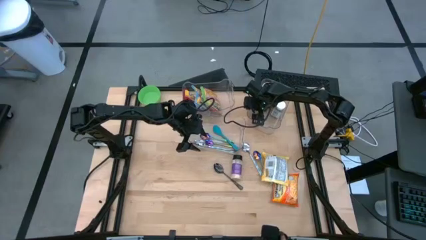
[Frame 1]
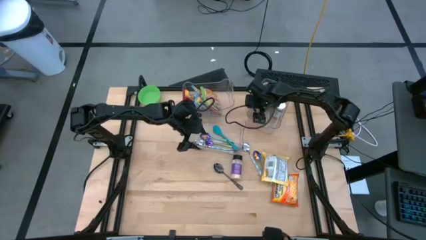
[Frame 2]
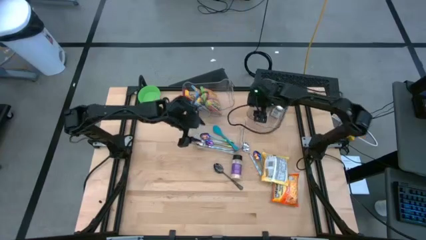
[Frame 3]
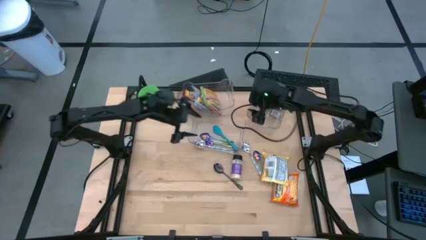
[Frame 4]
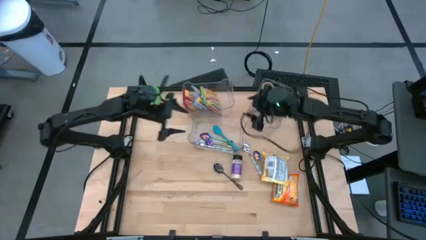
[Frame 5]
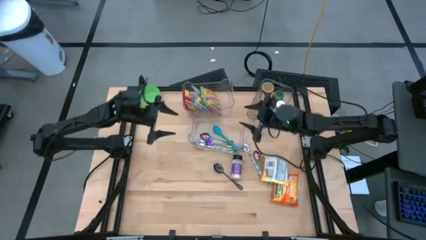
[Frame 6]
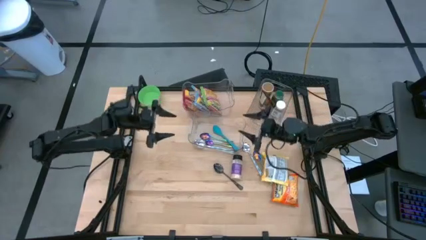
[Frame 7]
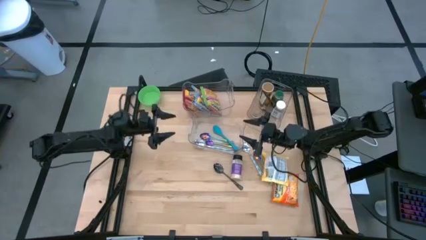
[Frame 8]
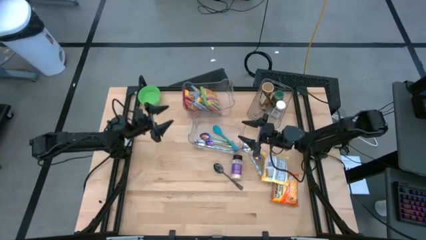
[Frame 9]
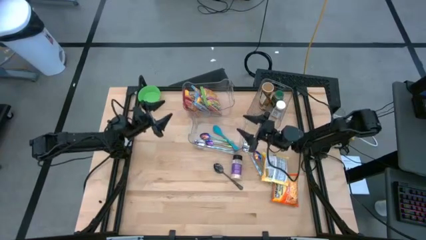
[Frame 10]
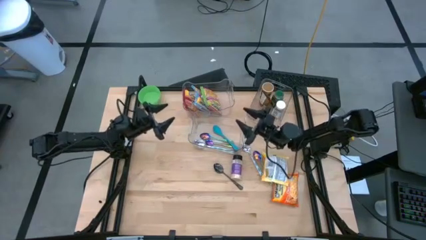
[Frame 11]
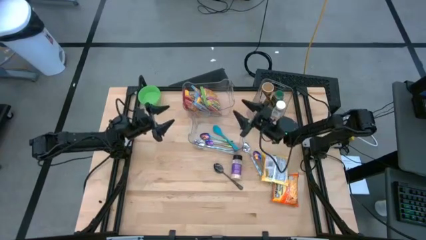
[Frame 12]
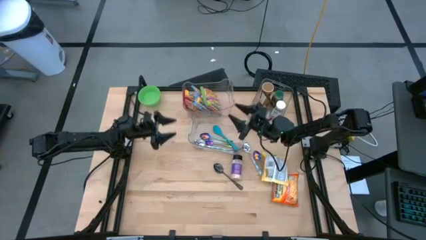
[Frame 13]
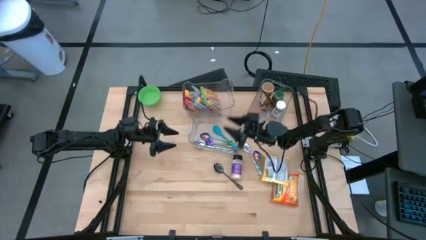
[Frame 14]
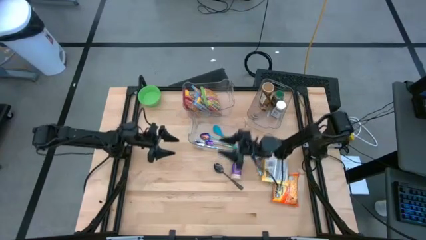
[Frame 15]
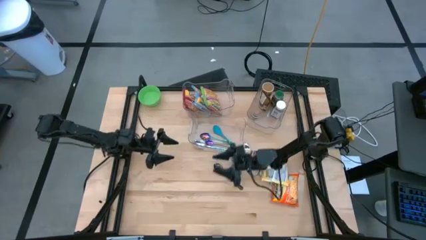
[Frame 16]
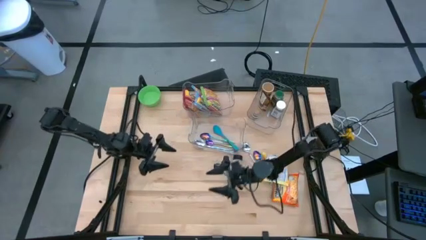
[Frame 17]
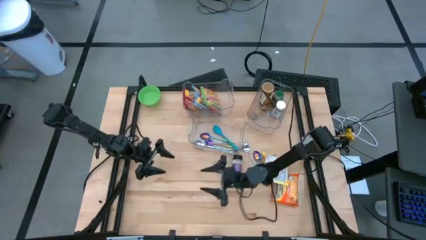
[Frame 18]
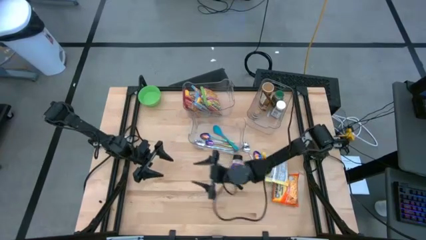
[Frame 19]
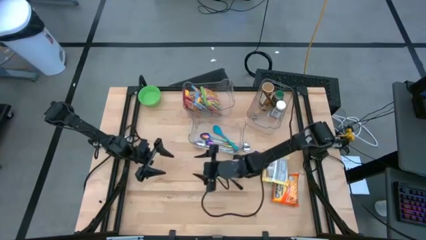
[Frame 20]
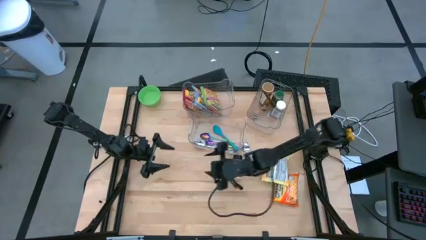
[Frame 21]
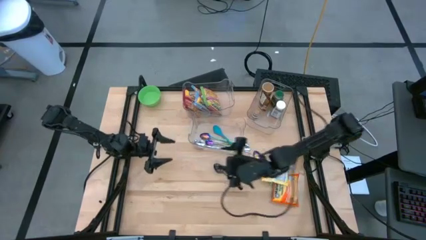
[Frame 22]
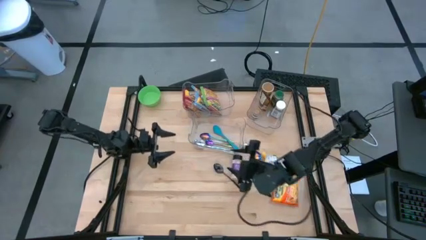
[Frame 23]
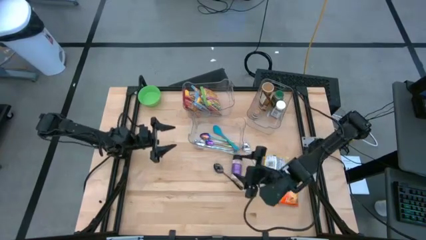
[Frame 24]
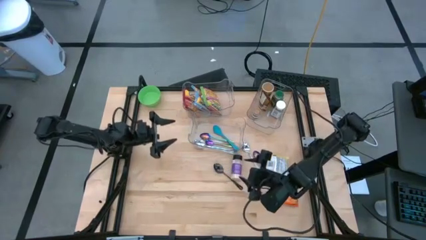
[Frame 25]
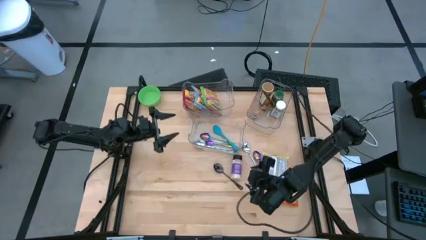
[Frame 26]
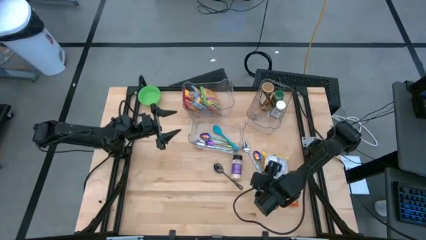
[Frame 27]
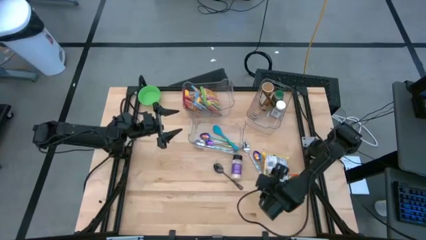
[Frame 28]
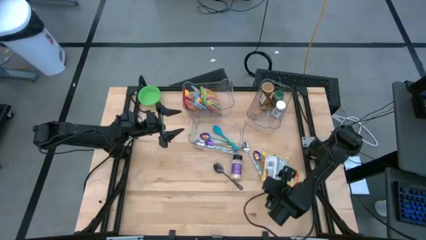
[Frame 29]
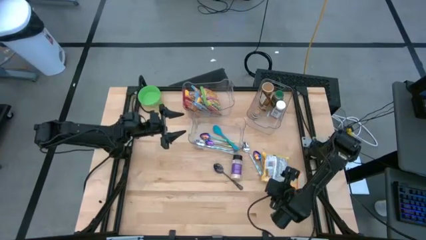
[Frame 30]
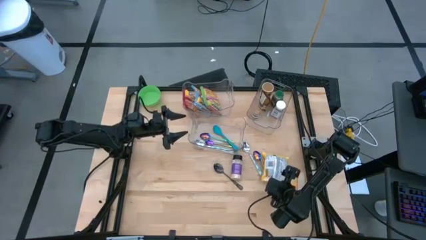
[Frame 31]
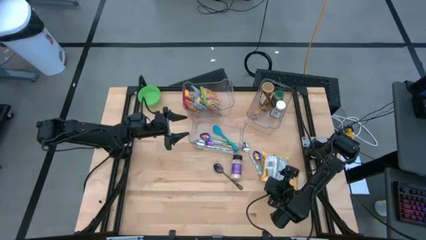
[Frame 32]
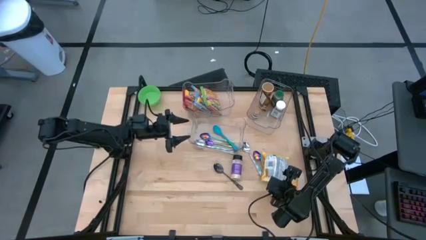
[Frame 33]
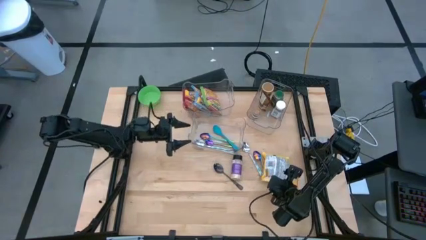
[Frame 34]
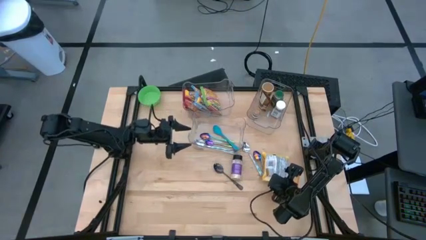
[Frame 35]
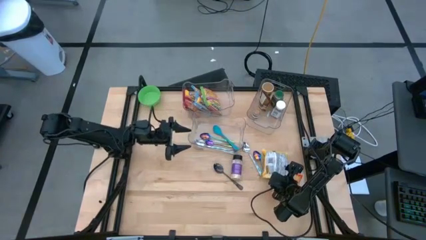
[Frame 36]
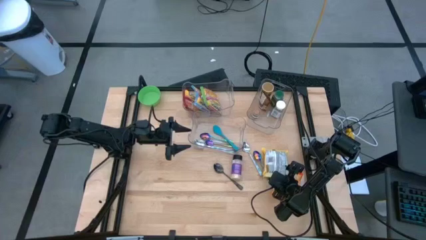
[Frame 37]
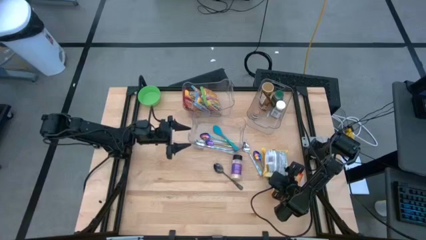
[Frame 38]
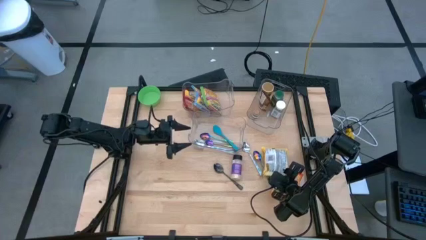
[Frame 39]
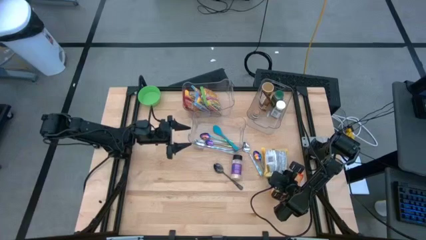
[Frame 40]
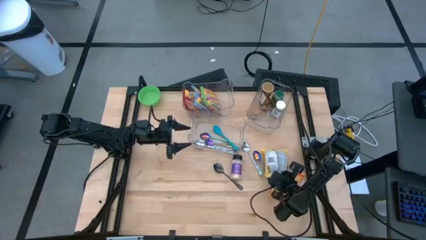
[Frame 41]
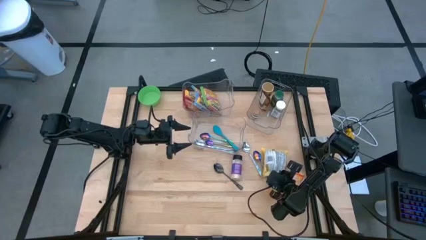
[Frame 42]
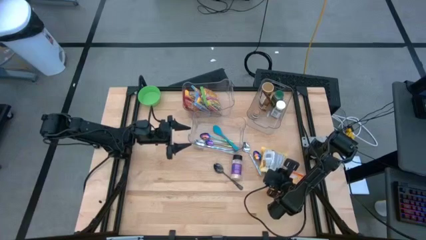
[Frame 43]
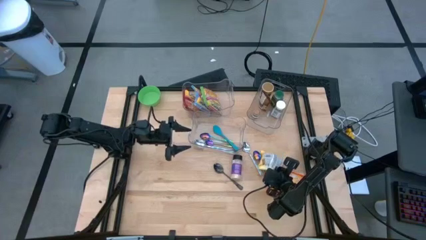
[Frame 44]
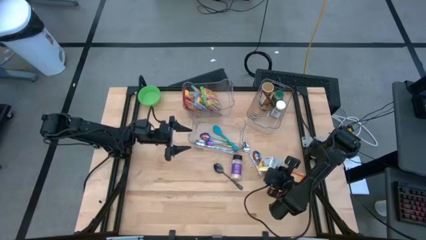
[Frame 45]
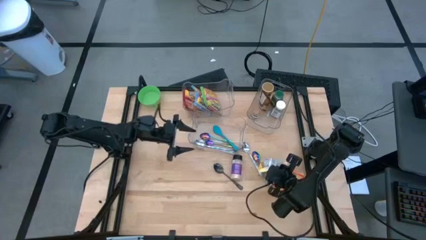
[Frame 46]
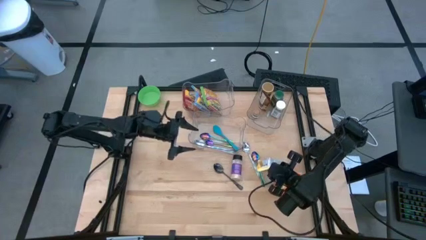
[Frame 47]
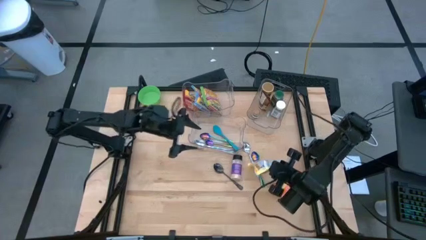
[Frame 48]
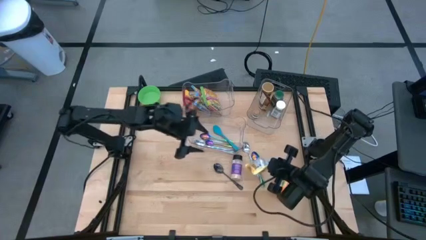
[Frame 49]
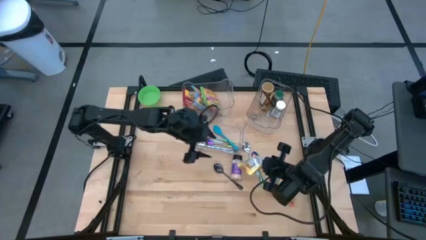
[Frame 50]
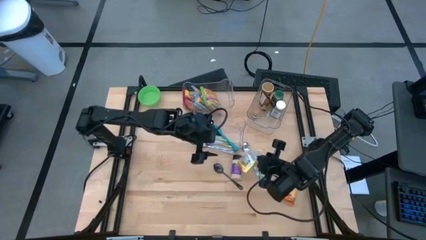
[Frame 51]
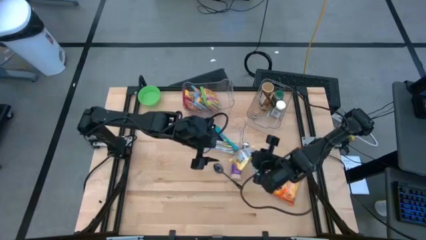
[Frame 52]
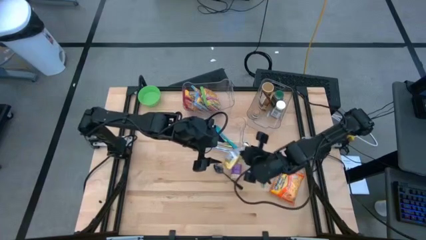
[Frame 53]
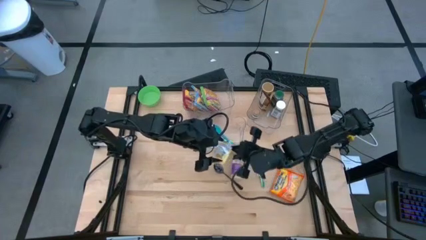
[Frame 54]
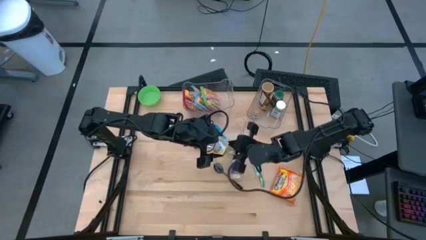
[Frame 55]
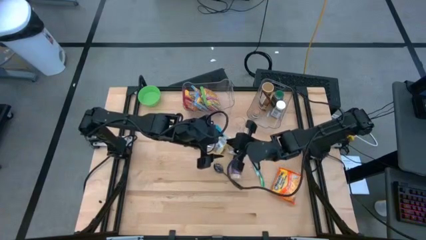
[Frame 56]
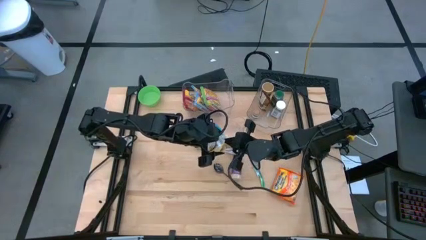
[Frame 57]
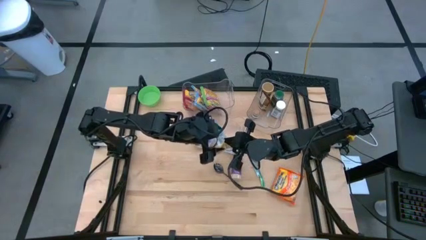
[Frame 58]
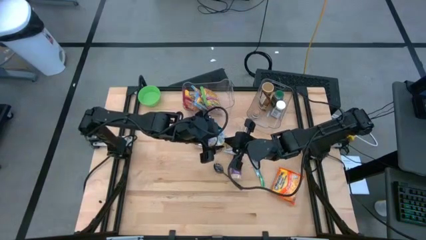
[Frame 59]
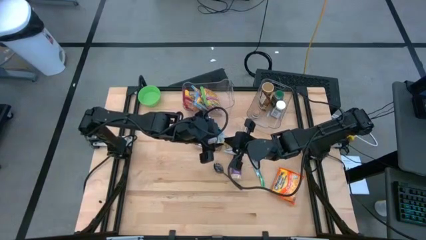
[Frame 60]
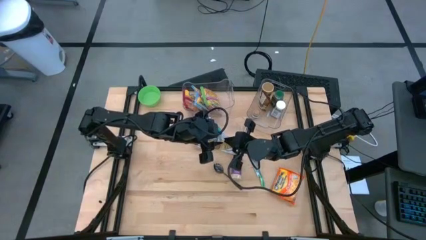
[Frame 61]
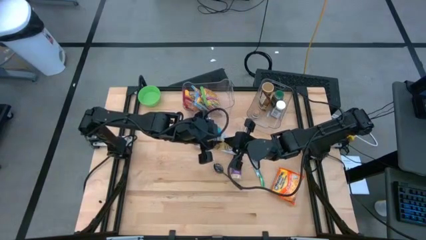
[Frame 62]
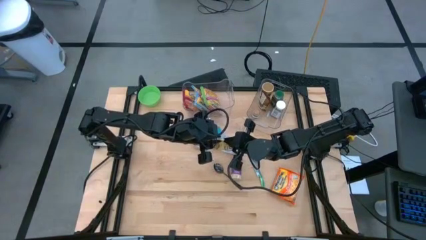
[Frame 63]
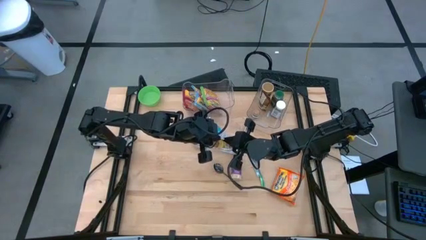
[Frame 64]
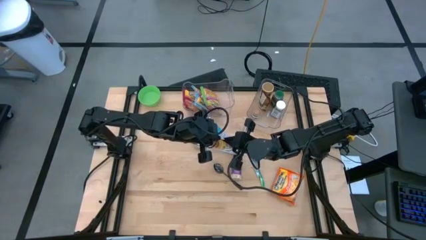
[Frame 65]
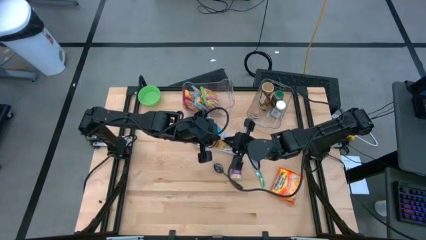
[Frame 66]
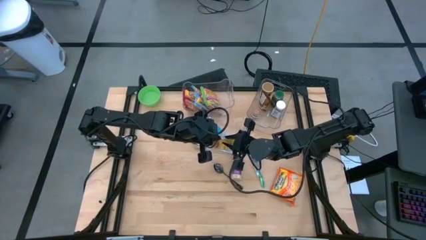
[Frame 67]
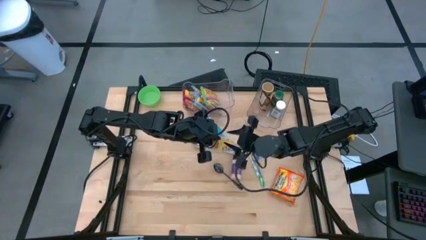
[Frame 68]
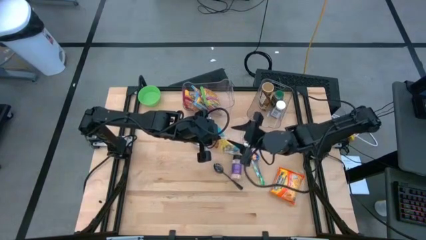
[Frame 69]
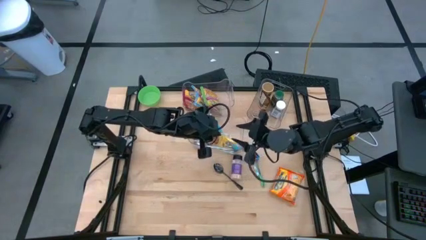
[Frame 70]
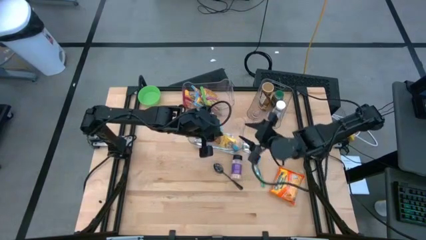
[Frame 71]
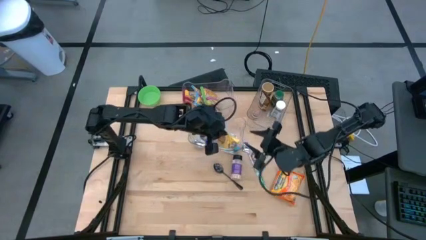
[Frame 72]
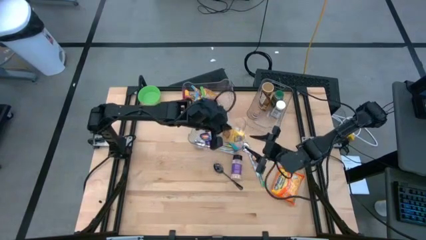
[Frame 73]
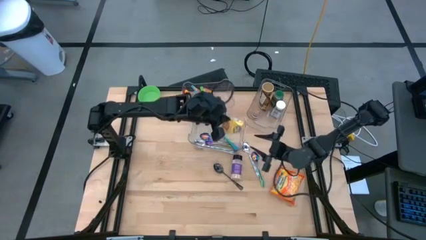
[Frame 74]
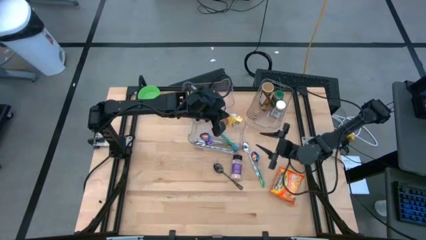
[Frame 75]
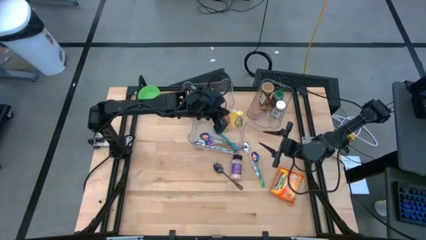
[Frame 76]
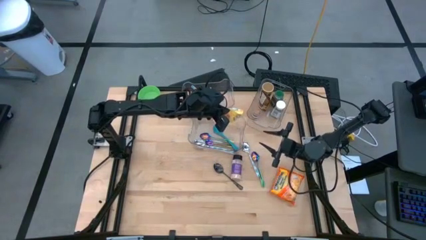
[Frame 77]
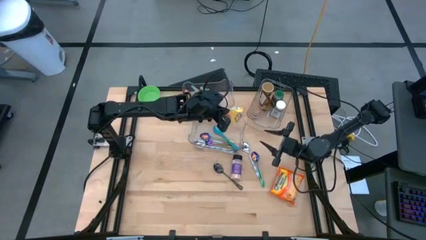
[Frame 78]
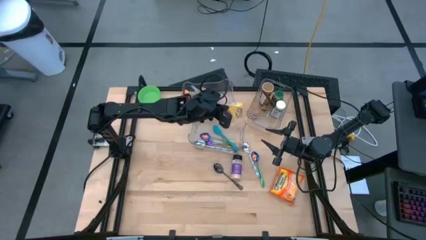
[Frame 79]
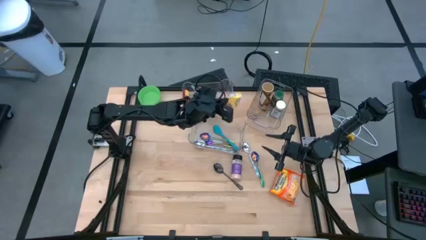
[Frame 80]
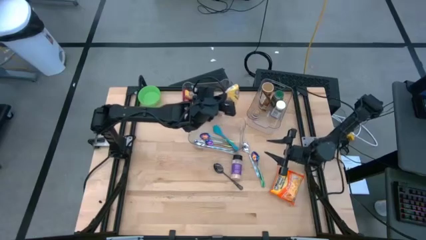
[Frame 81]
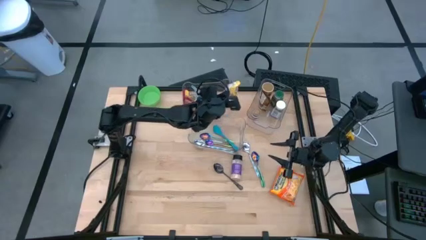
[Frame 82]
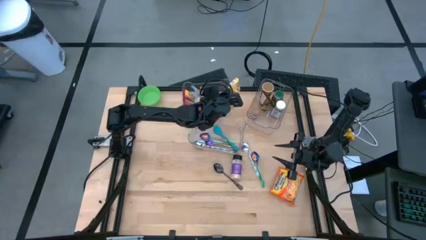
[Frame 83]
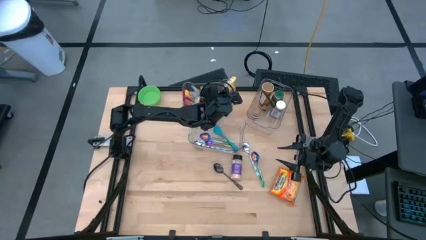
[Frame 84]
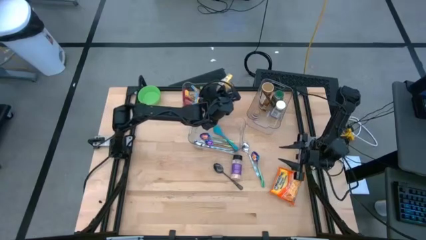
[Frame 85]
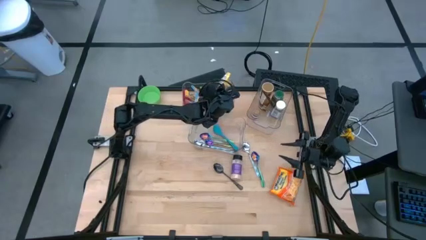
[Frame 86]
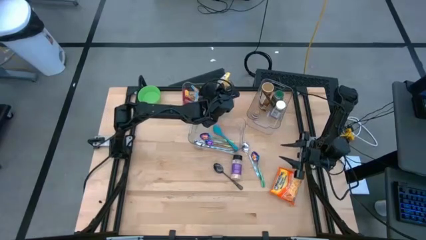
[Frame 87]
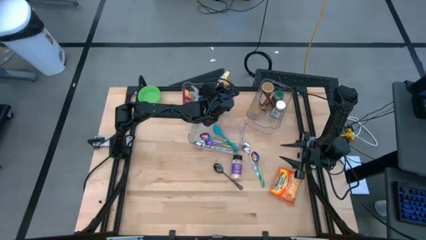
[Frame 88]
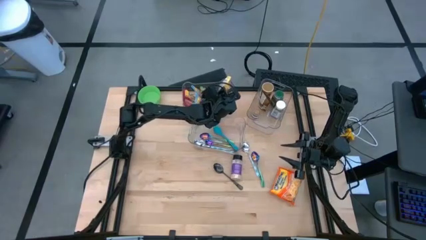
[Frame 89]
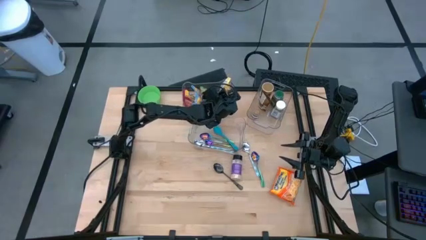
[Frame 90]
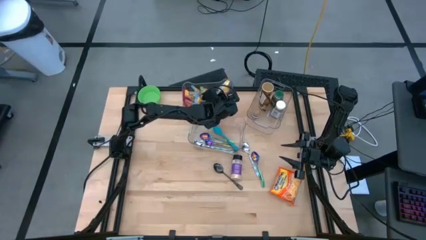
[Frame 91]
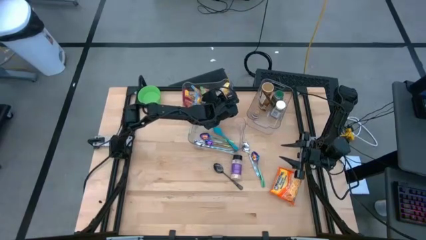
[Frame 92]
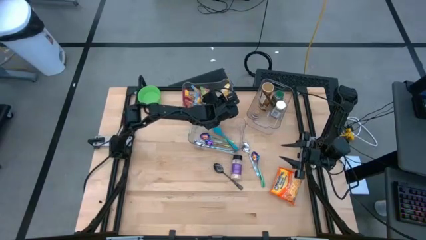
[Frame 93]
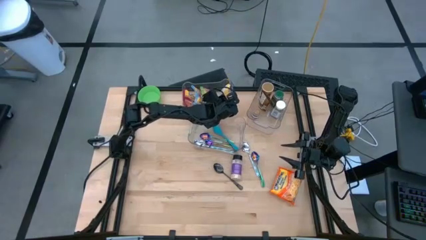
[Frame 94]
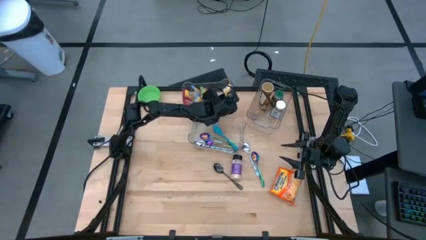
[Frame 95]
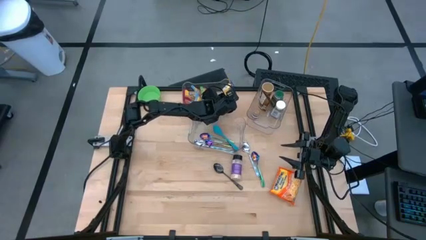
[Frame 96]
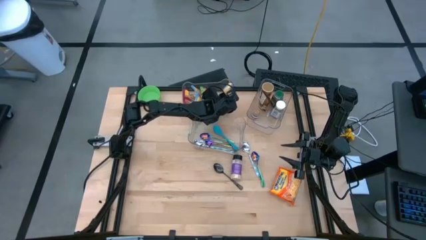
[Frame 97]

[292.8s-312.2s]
Task: Pick & Place Food Item
Put the yellow noodle pack into the top left transparent bin
